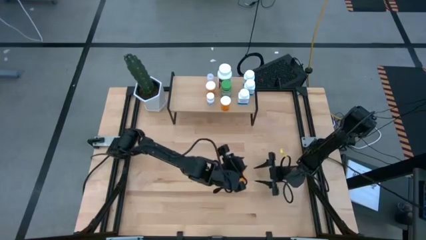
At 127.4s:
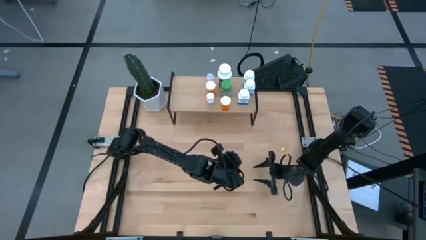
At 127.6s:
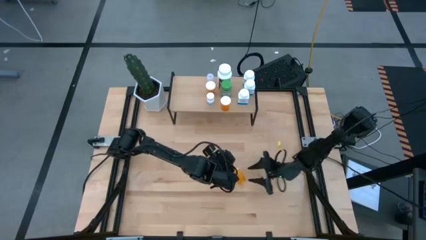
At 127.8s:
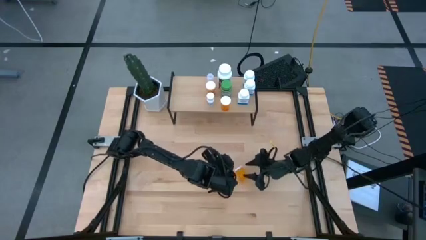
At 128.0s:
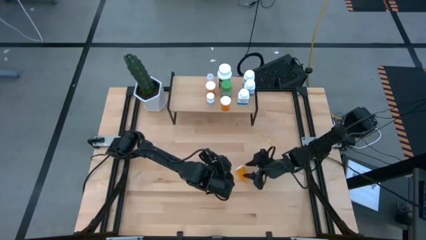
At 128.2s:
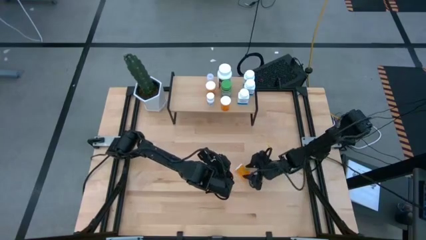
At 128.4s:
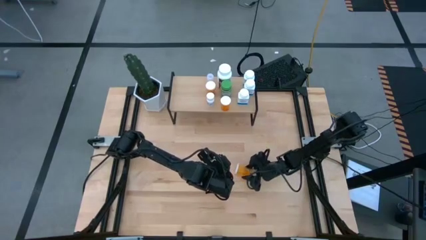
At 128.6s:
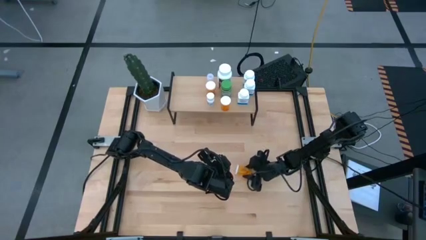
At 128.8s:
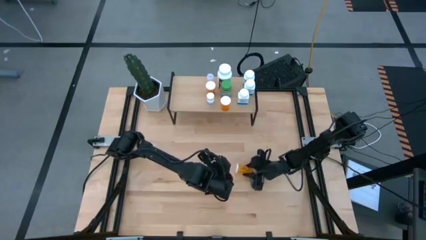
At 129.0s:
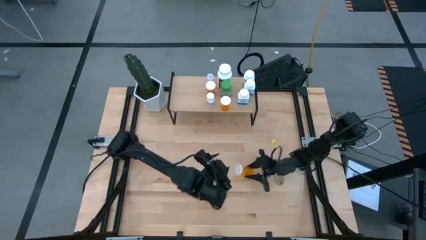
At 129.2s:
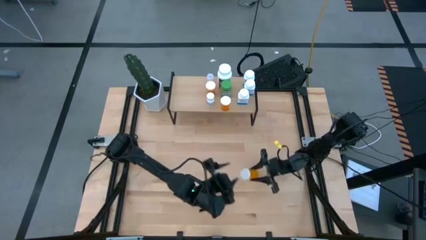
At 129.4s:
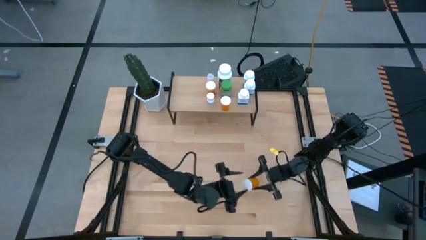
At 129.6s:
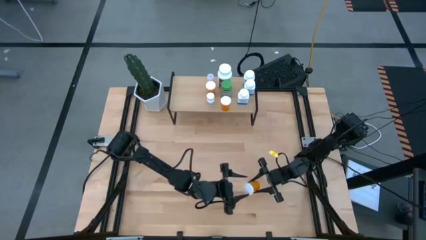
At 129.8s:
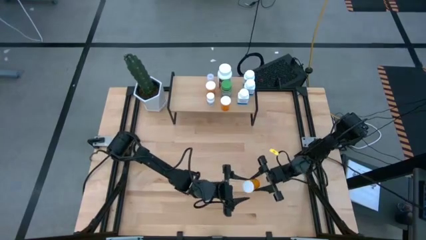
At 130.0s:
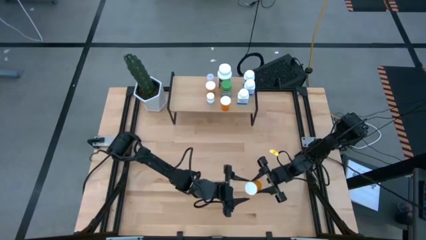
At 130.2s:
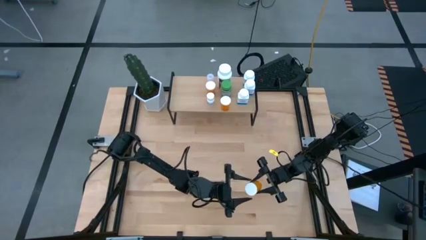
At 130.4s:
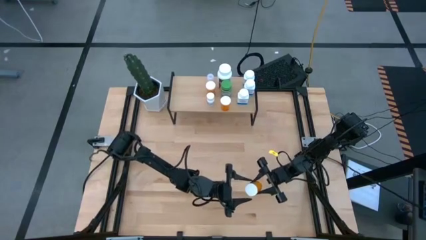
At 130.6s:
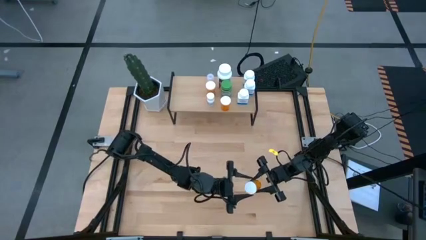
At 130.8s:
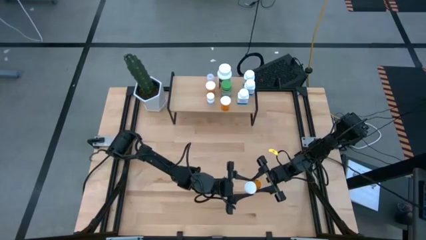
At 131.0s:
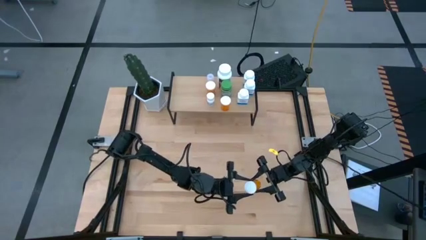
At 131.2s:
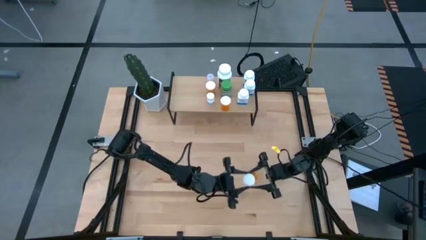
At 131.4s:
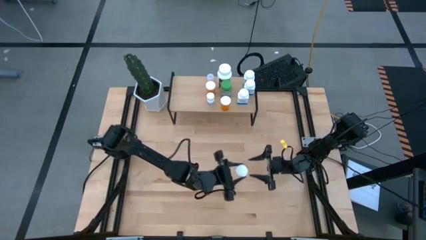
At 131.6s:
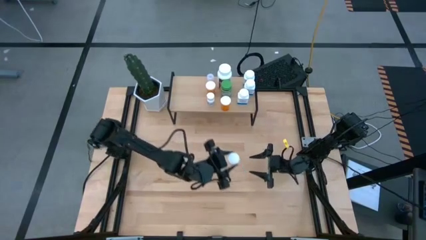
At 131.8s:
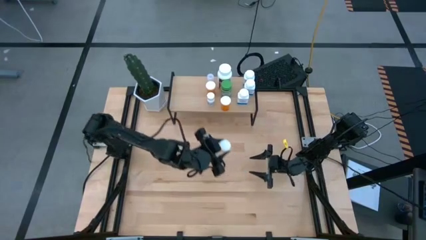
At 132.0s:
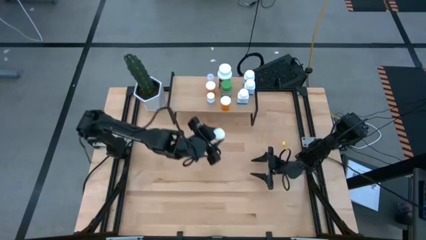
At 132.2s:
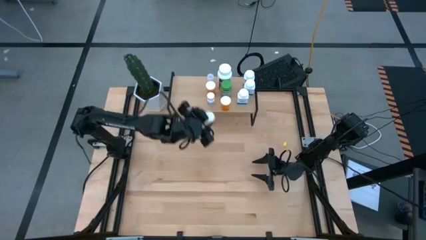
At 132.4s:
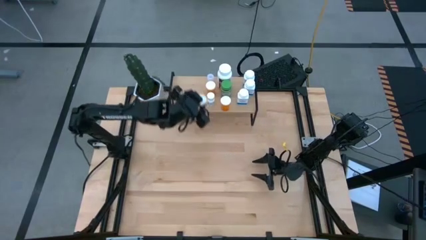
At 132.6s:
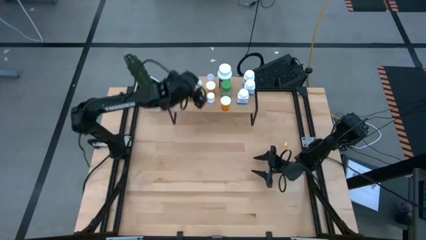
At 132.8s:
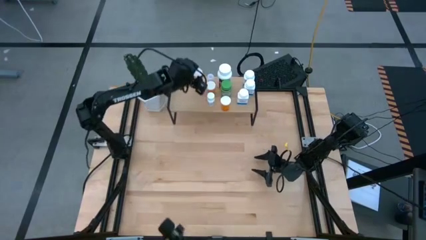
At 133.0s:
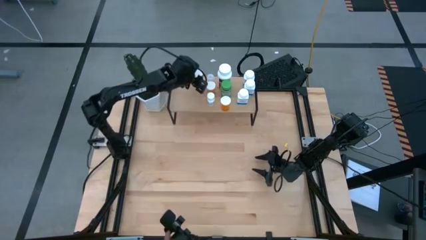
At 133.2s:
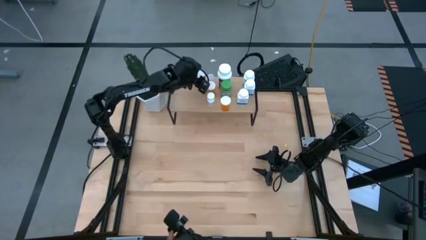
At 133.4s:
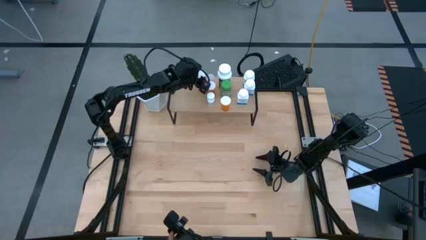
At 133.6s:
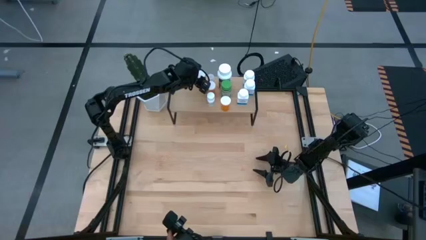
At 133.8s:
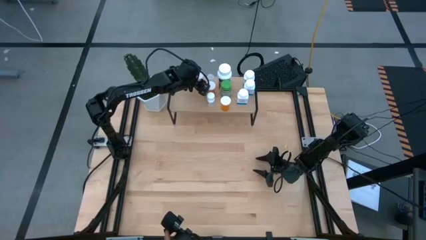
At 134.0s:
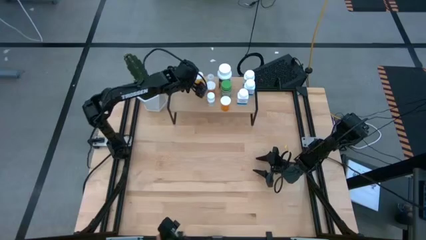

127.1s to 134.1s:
Task: Pick and place medicine bottles onto shelf by color
Put the orange capsule bottle on the shelf

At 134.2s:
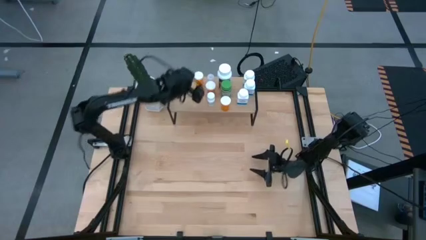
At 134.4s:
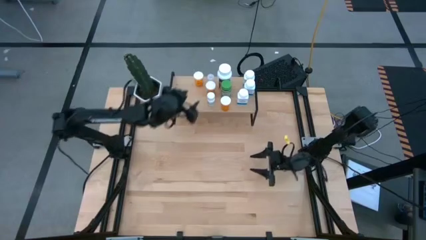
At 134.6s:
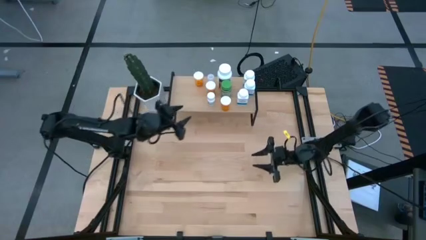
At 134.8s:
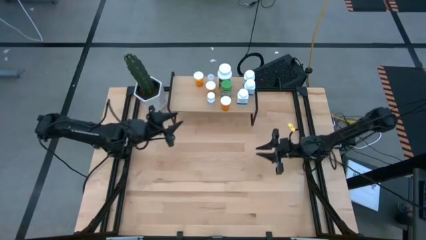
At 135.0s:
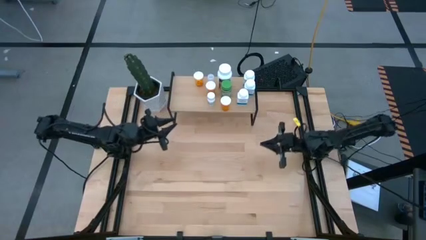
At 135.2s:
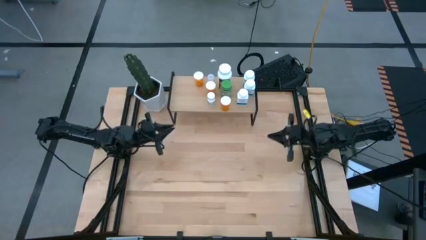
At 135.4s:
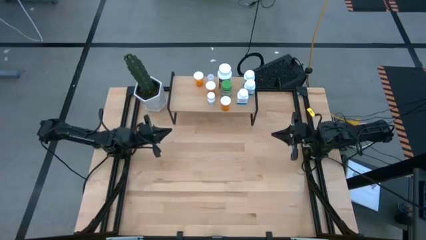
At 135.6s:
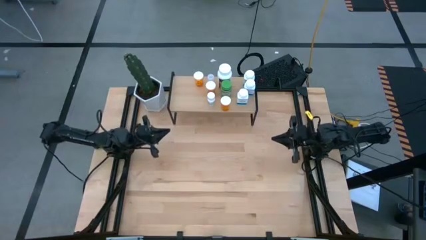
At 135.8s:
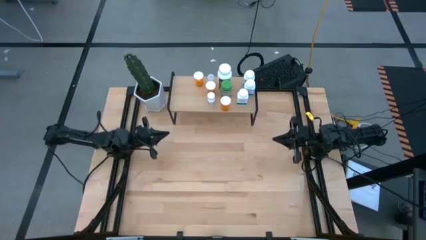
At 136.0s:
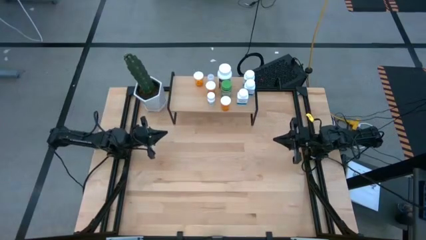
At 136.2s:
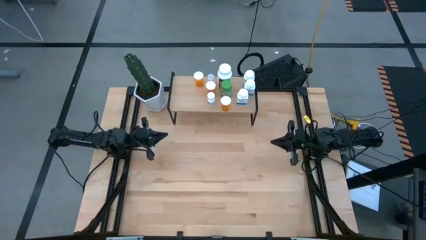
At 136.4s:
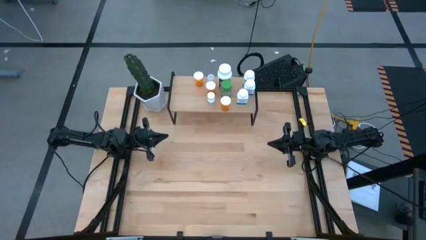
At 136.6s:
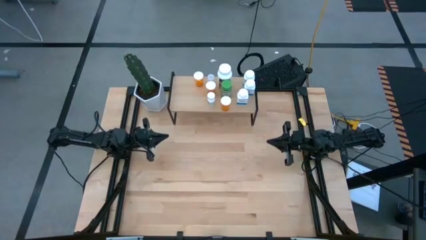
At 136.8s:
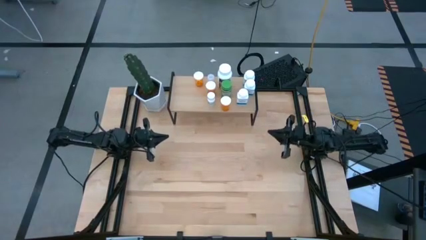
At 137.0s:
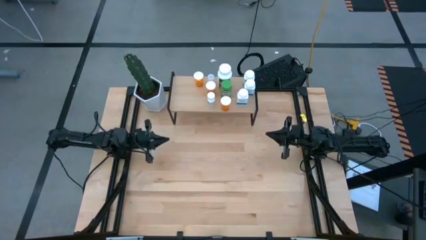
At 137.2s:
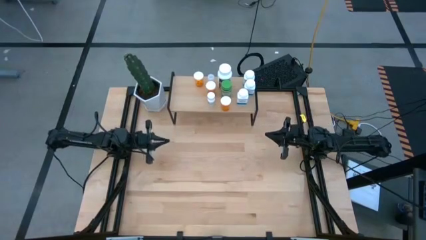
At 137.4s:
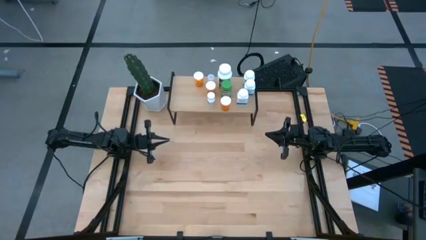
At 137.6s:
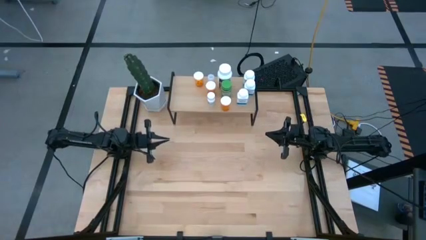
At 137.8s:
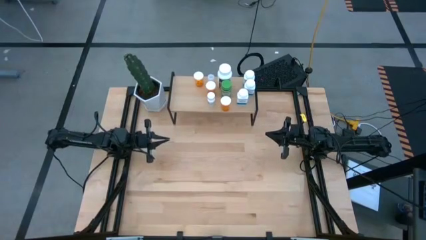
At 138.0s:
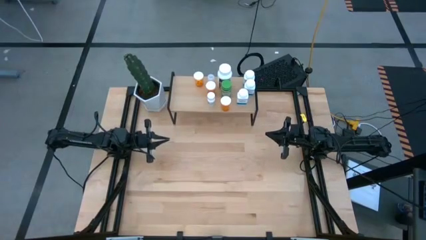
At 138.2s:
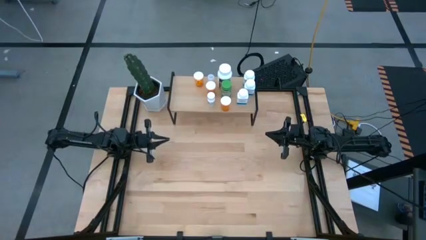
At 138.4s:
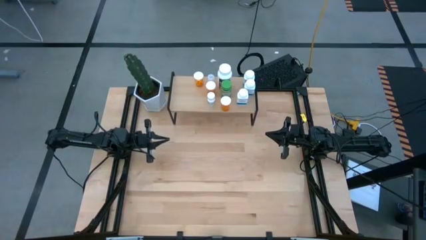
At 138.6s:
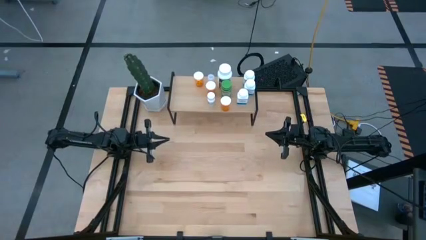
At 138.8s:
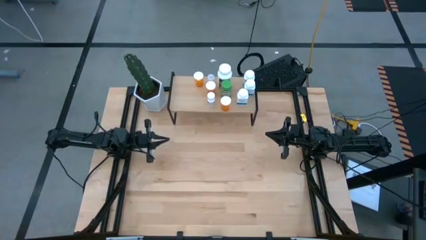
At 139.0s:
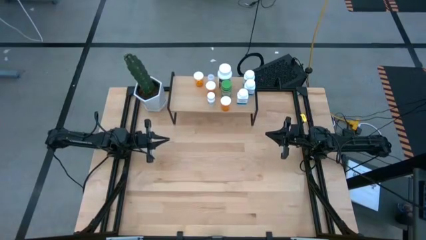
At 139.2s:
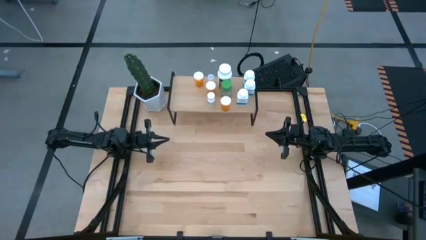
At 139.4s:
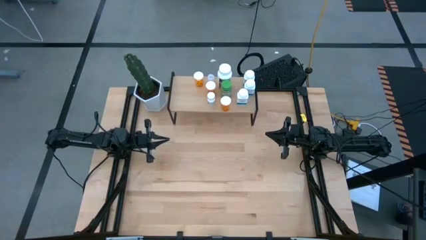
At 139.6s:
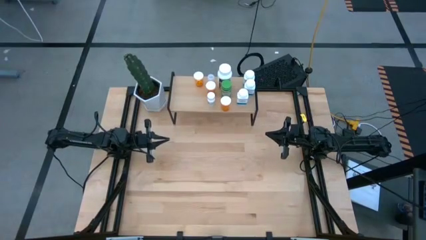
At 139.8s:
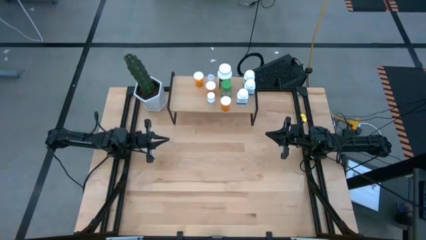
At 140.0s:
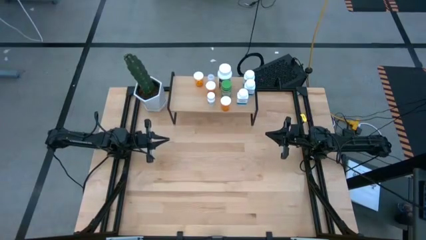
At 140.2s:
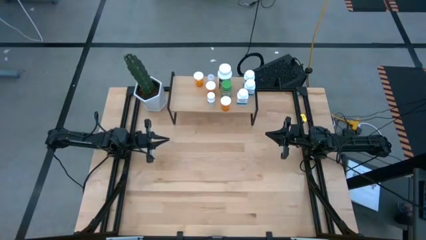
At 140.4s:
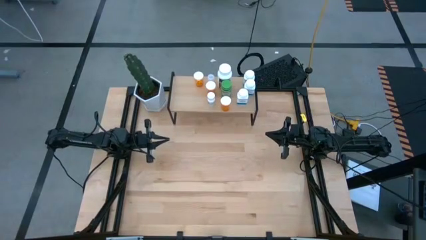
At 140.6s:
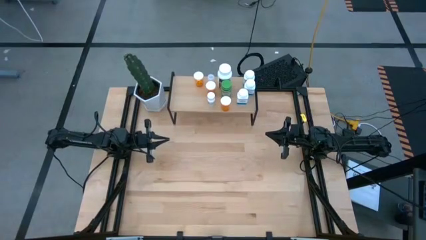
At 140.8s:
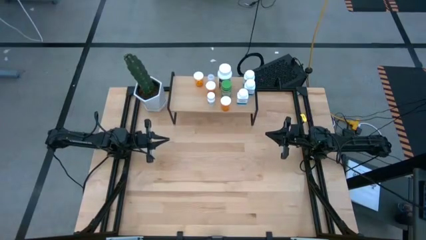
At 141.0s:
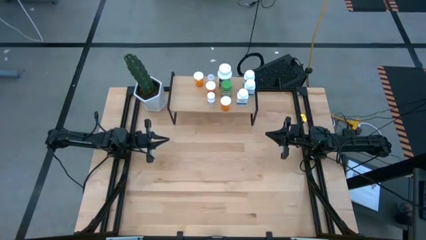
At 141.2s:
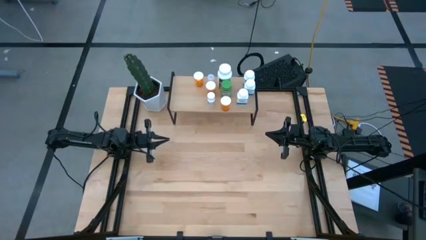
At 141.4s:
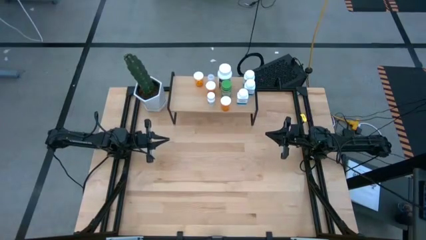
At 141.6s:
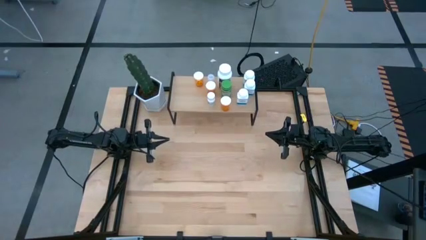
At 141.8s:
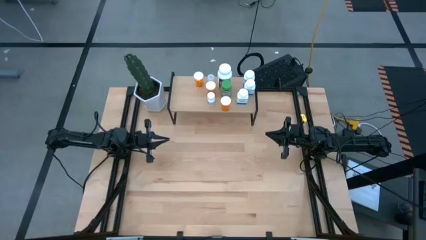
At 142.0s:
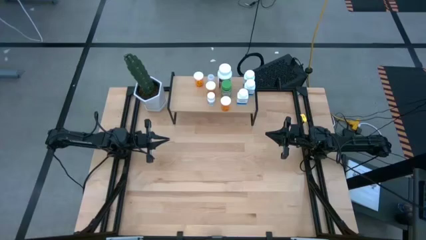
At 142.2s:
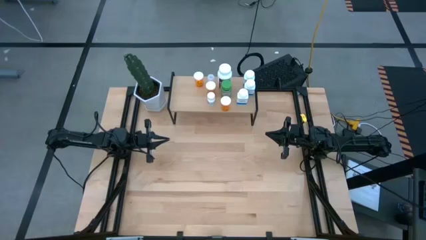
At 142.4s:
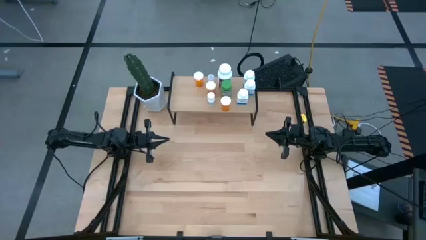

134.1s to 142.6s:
Return to Home Position

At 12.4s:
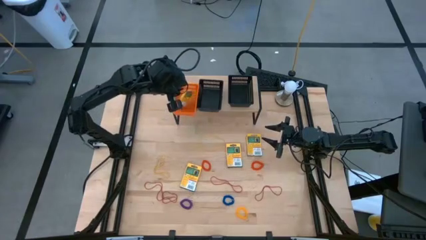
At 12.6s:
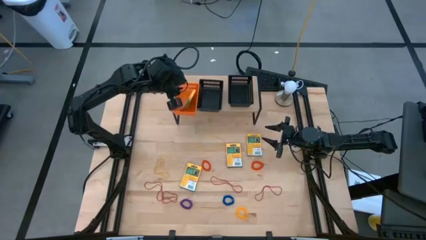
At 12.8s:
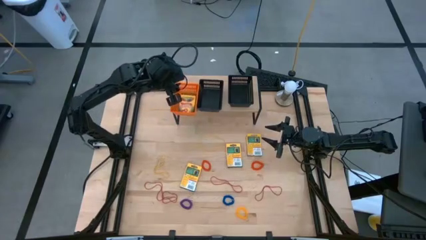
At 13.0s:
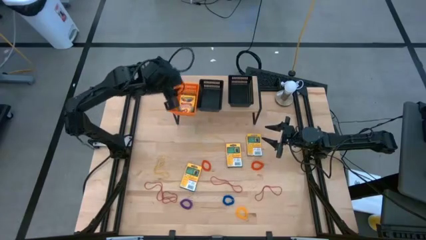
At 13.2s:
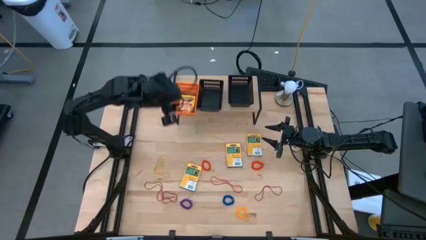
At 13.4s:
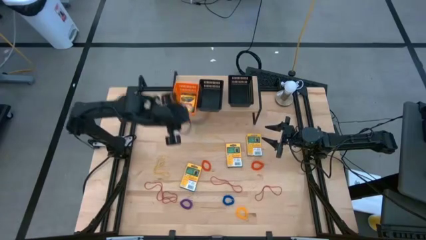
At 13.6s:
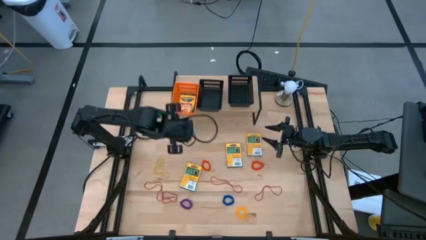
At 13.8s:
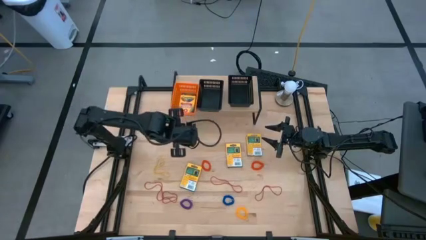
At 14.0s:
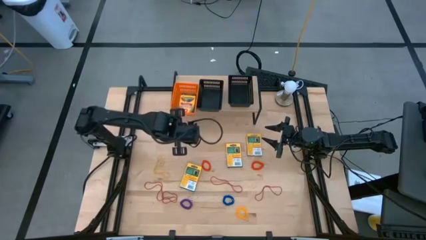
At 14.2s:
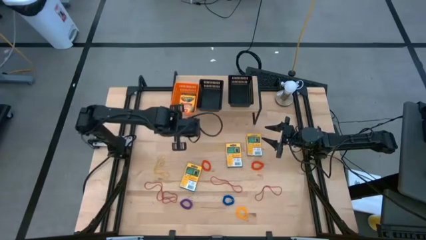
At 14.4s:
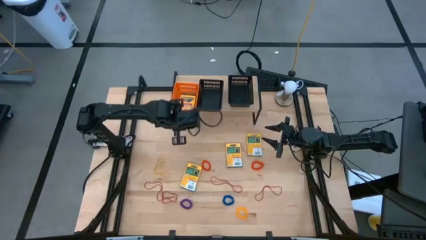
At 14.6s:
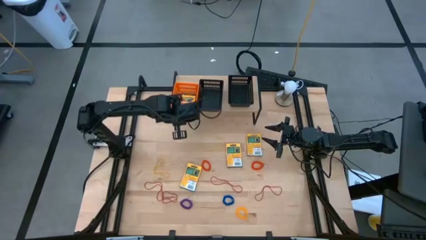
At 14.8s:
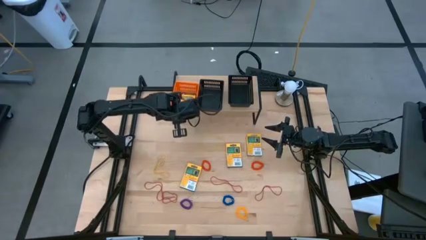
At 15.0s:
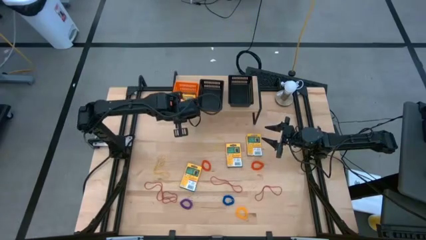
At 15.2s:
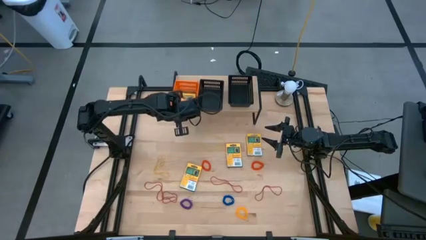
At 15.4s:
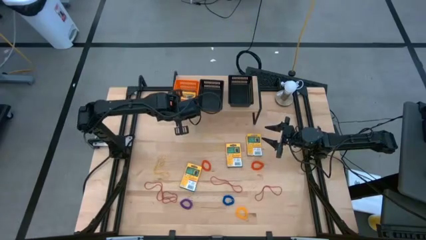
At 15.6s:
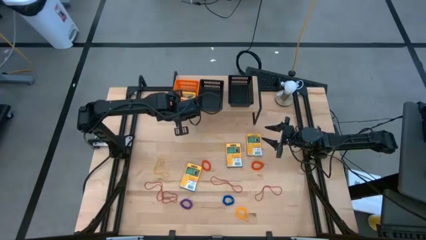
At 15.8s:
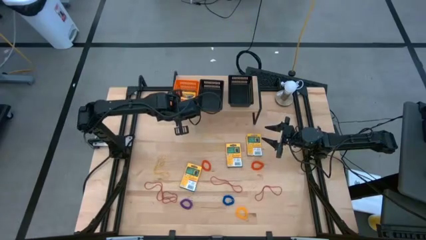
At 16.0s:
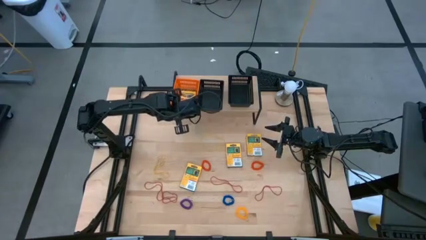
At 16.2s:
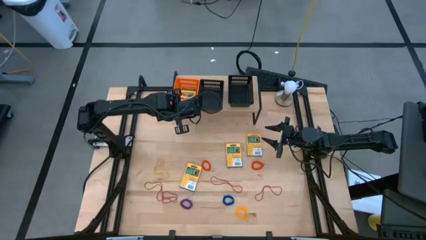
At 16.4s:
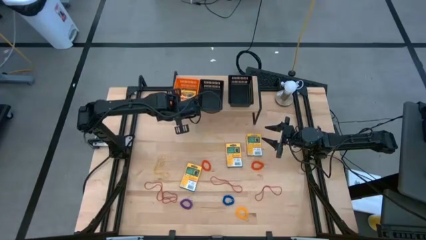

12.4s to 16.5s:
Task: Pick & Place Office Desk Supplies
Adjust the orange bin on the shelf
